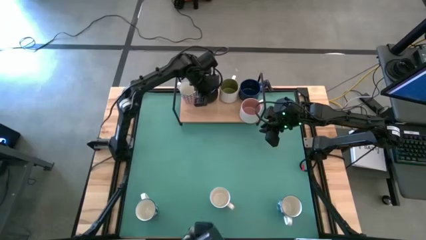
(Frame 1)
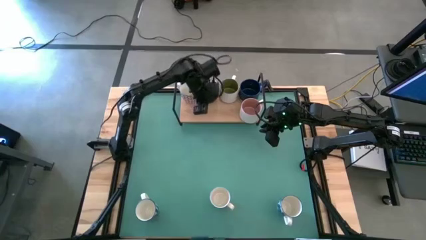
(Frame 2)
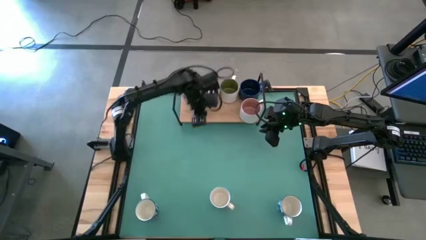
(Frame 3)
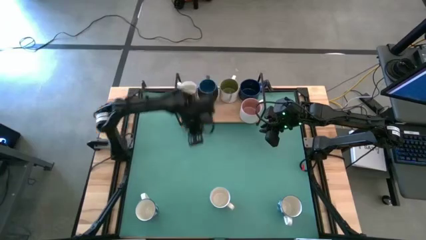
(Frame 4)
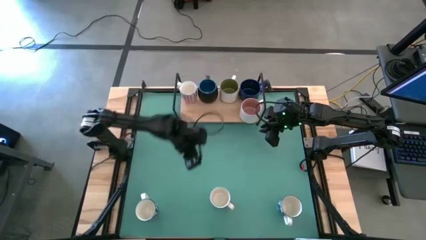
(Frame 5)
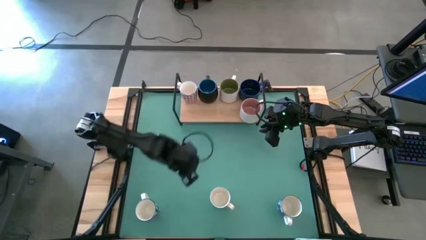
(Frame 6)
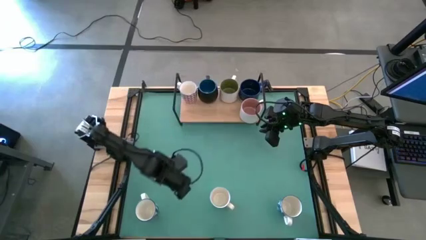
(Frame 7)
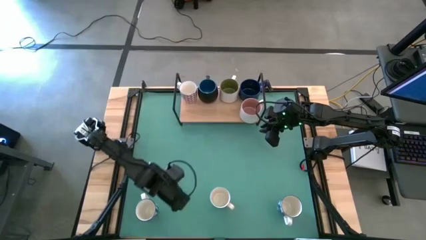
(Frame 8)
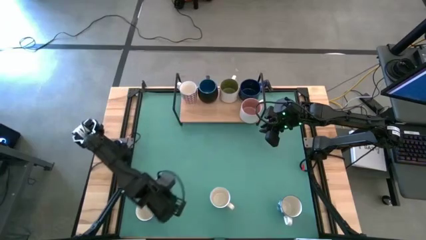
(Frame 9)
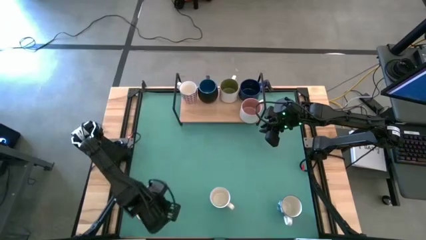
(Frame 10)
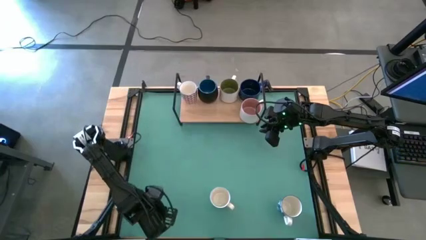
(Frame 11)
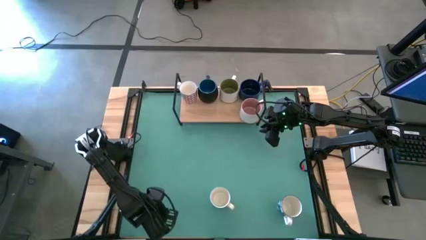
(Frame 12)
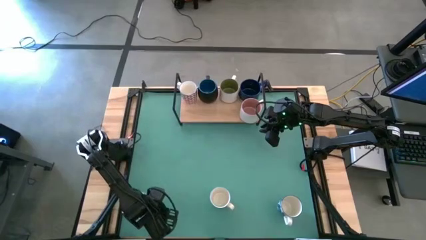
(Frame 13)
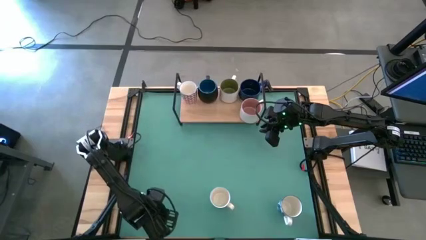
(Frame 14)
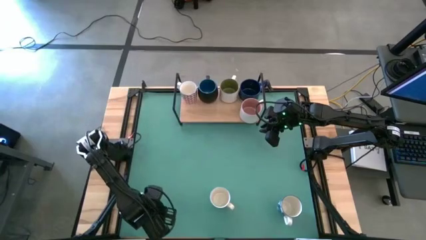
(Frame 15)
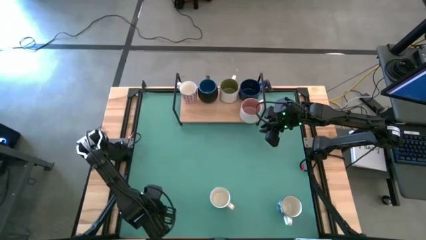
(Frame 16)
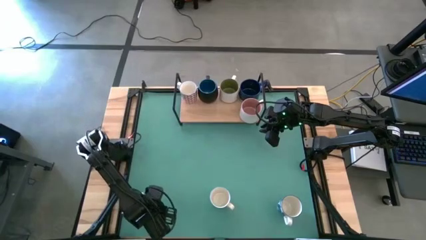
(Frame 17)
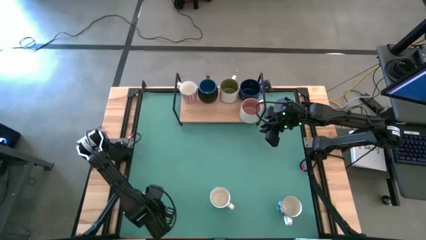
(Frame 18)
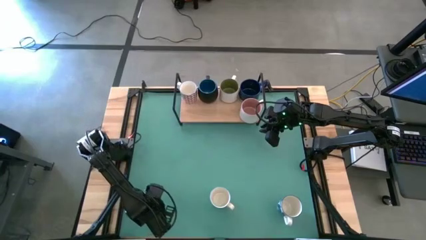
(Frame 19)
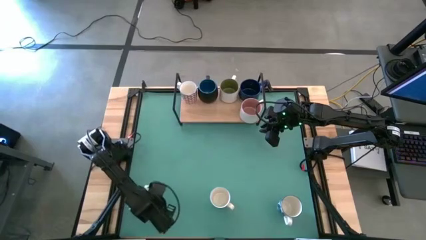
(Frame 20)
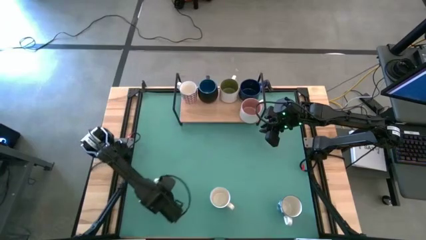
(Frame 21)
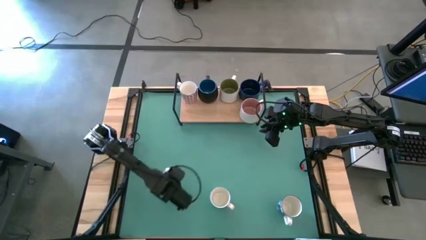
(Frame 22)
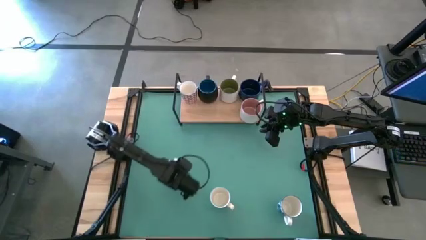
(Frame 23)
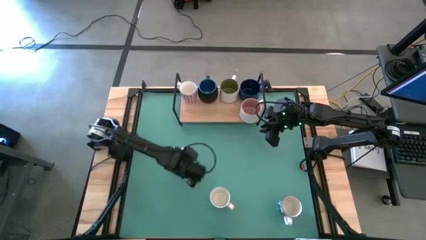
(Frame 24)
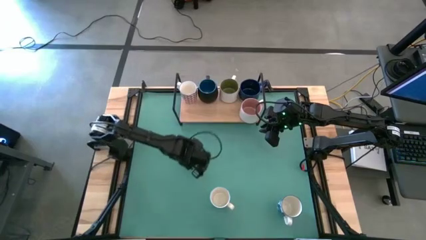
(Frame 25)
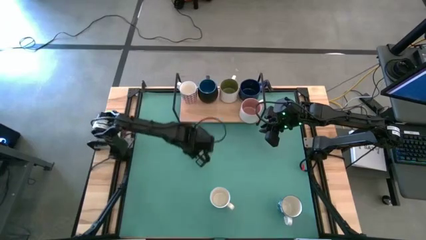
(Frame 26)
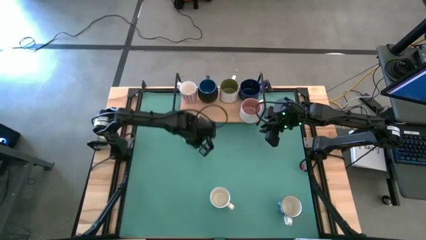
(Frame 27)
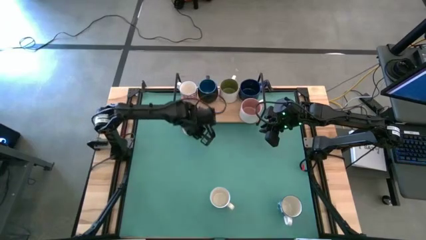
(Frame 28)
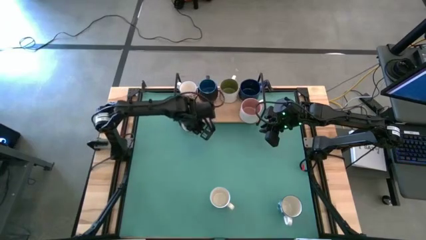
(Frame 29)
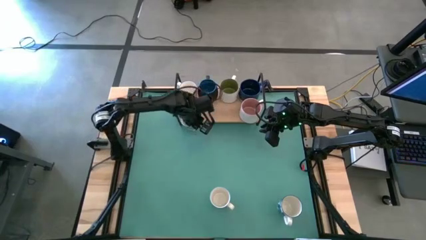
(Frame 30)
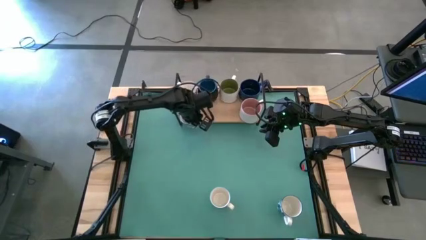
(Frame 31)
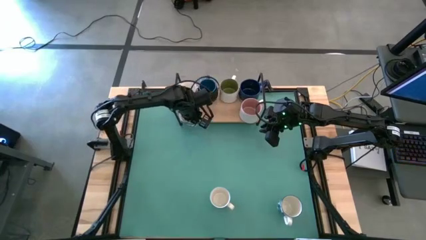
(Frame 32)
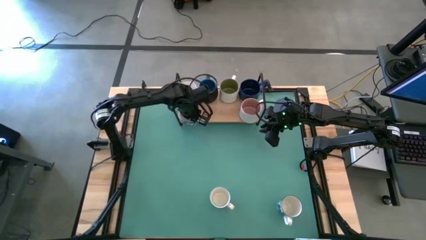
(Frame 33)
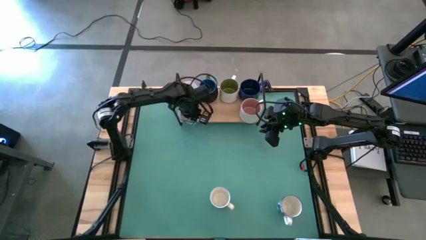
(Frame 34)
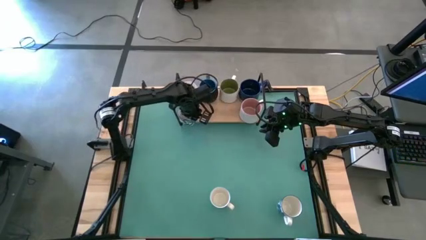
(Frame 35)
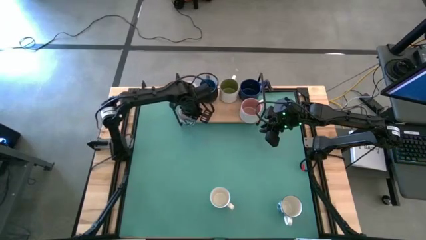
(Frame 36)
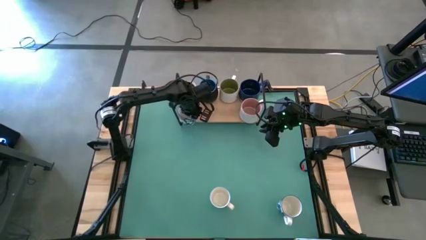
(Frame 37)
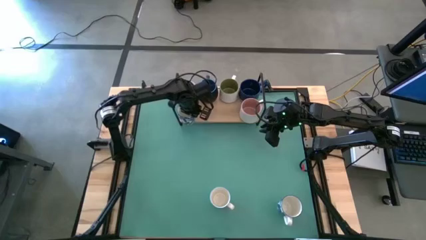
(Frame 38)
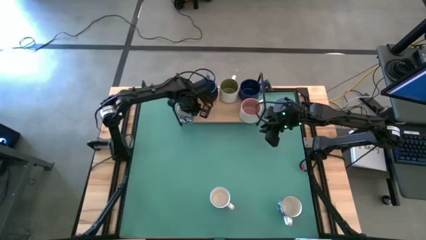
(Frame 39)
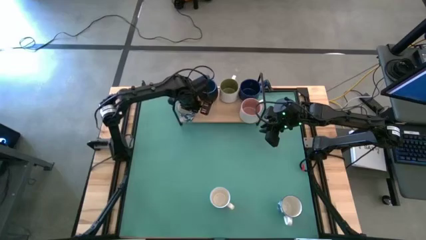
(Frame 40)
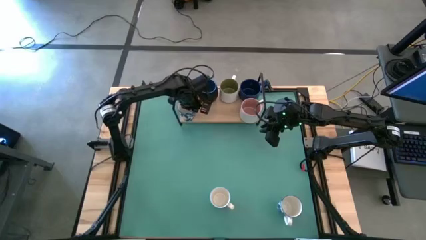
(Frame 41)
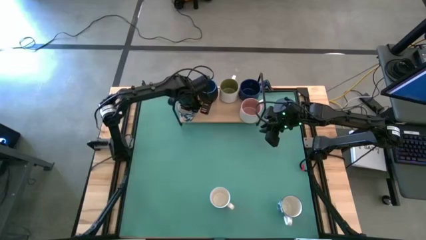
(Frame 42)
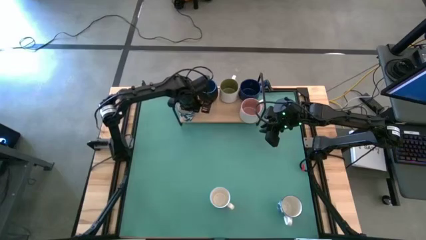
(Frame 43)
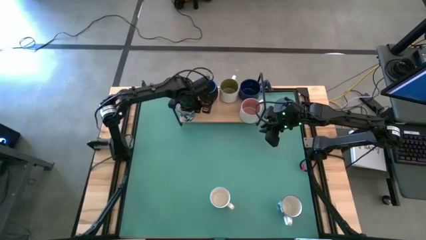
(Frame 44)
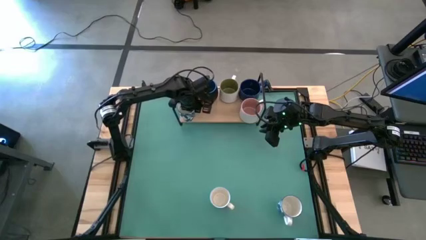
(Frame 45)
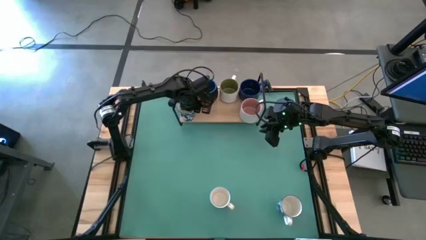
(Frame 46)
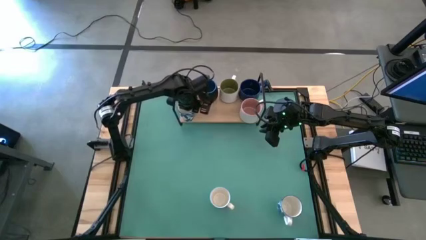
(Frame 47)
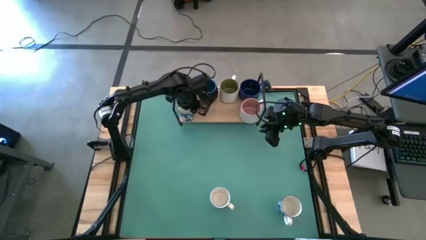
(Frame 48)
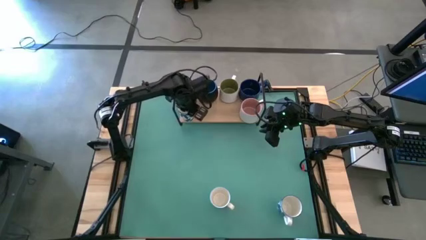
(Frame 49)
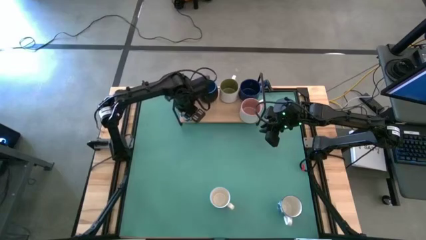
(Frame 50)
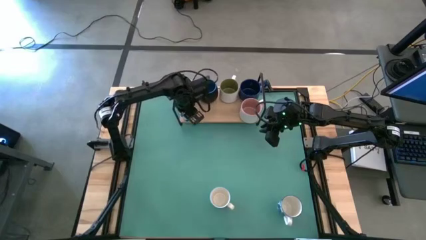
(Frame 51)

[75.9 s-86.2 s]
Task: Place coffee mugs
Put the blue pattern mug on the shelf

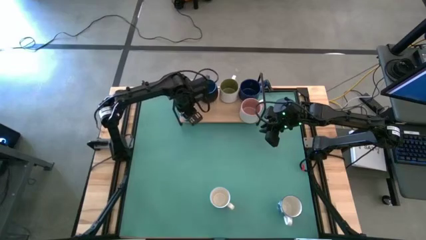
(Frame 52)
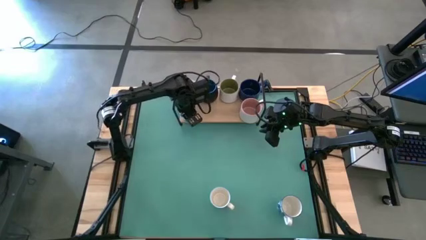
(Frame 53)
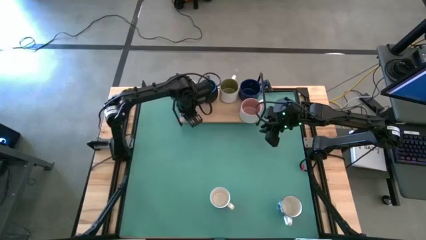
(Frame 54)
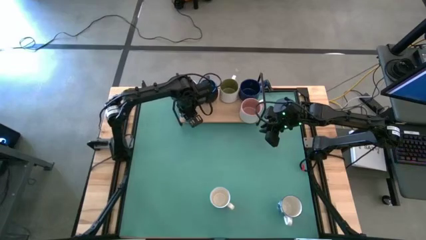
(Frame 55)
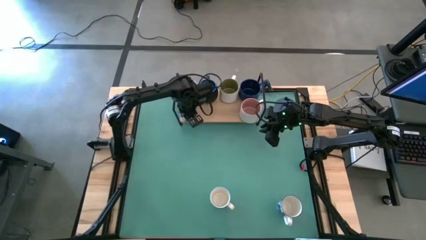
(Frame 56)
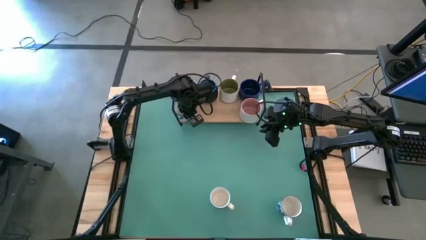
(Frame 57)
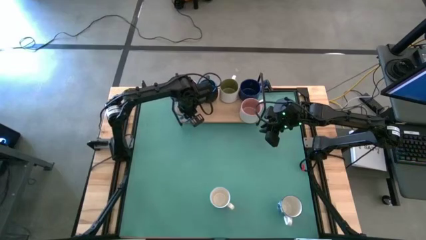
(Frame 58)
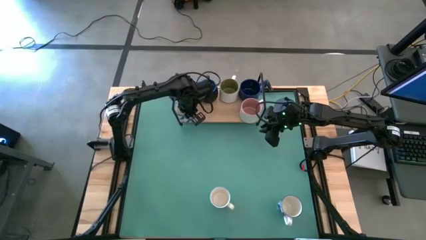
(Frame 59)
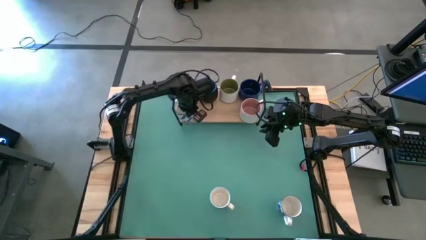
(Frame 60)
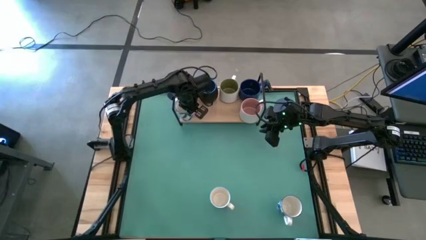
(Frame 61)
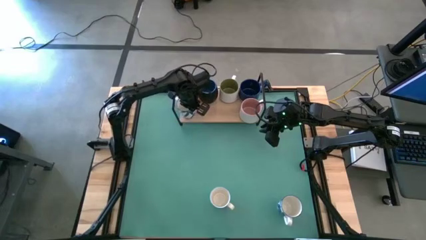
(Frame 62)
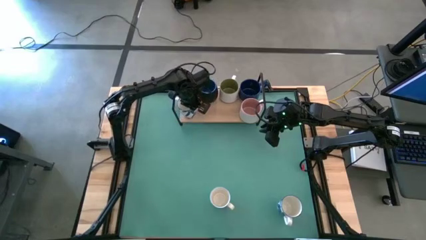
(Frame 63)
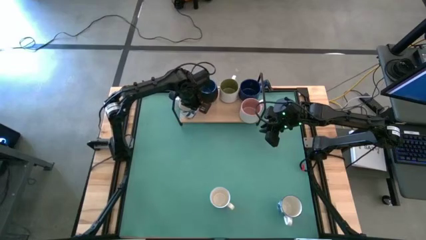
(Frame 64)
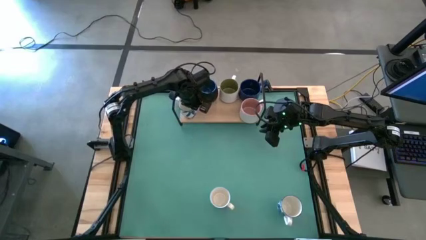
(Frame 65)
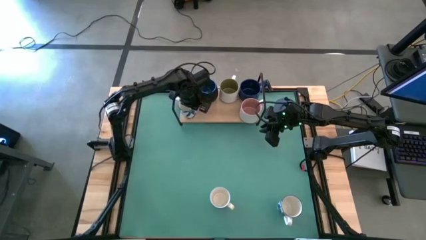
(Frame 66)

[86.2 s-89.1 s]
Adjust the blue pattern mug

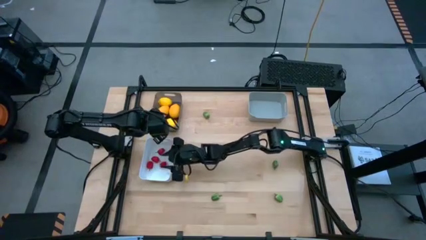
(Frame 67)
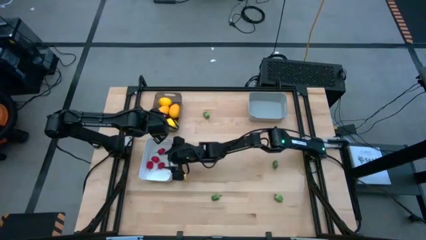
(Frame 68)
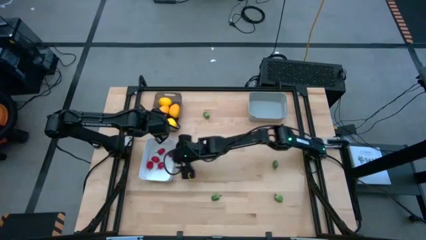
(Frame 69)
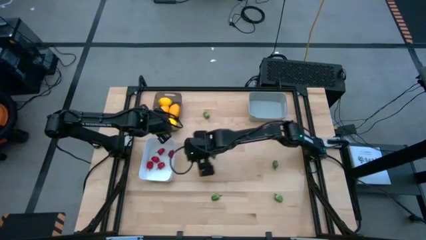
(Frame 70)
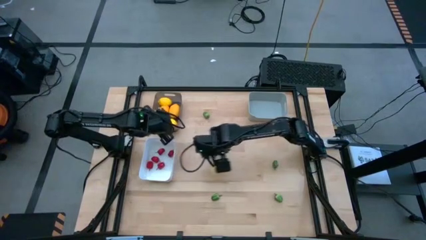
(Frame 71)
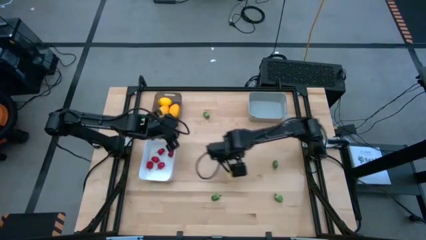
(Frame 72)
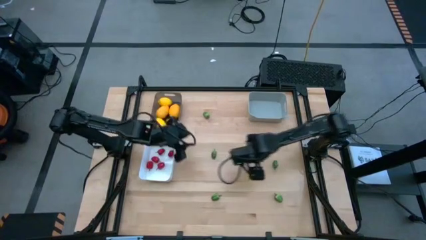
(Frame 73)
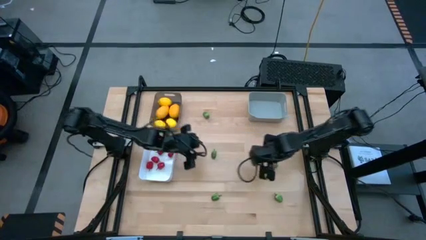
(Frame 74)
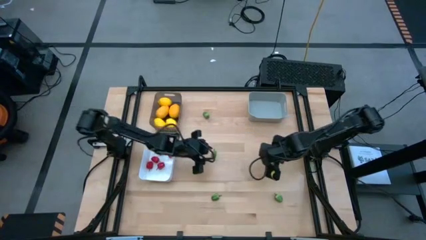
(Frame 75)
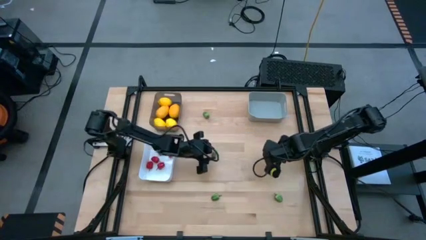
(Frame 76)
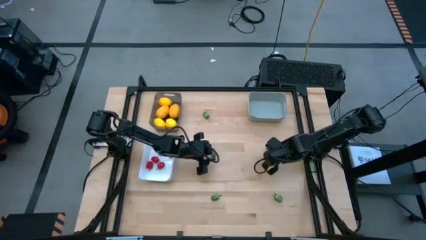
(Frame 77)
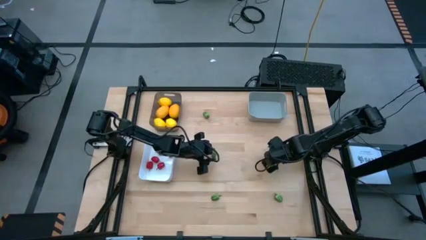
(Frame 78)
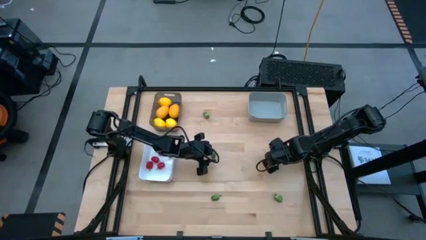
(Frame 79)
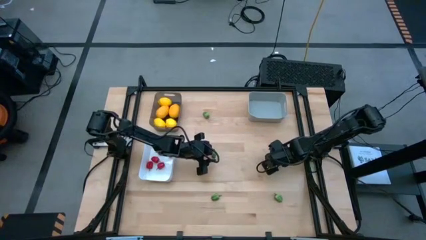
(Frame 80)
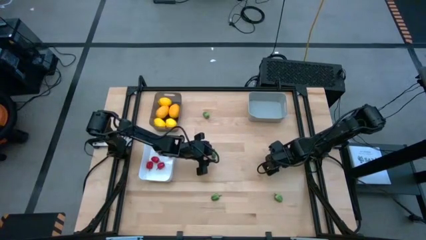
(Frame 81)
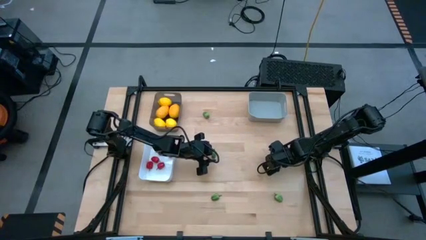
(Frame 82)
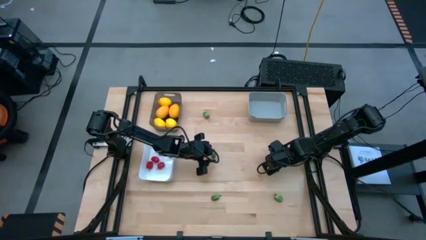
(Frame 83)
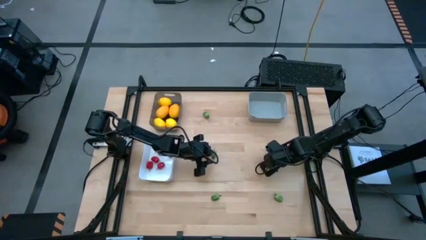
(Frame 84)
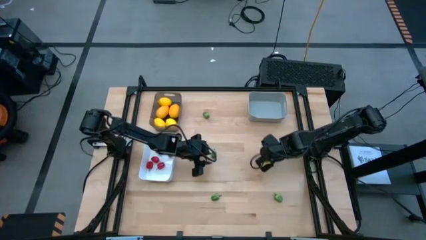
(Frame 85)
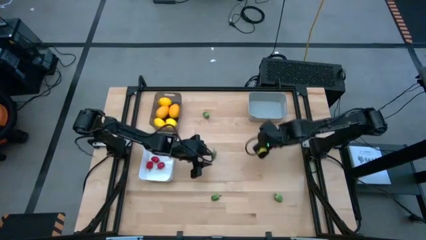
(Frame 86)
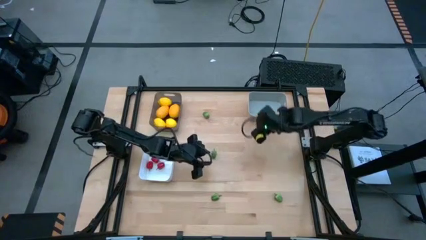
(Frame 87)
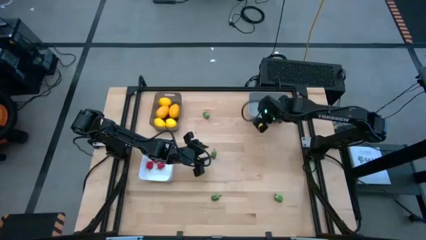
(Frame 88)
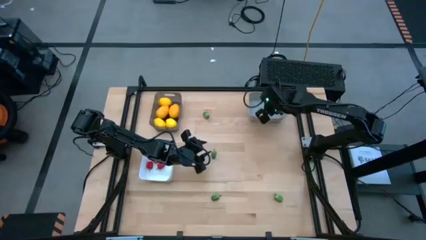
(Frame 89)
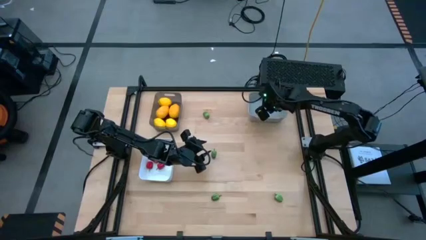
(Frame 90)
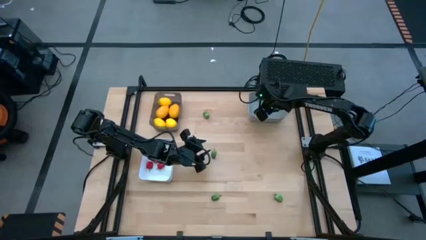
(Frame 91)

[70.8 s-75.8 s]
Task: Sort produce into baskets
Put the middle right green chili pepper into the gray bin
